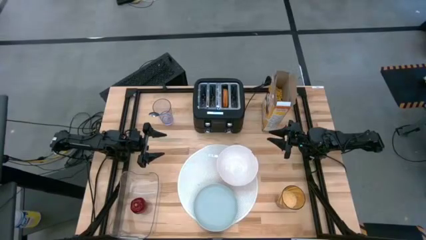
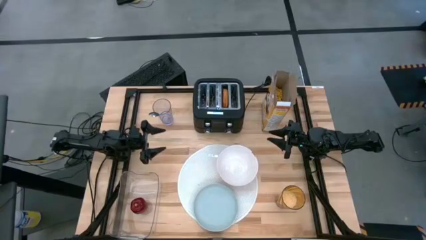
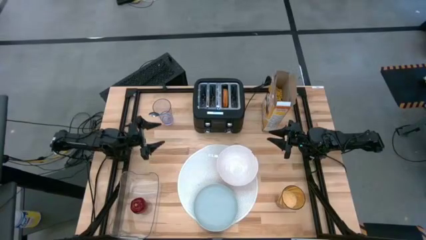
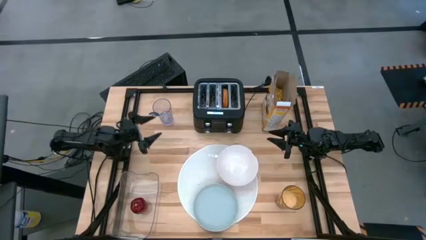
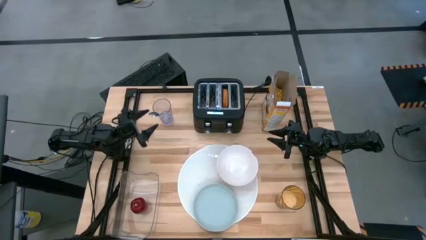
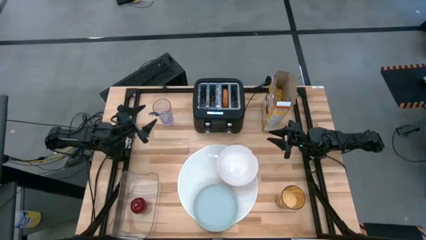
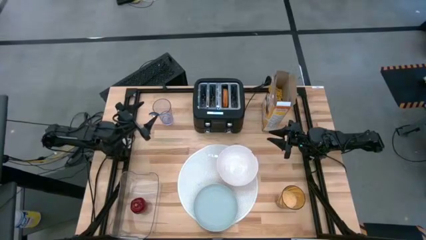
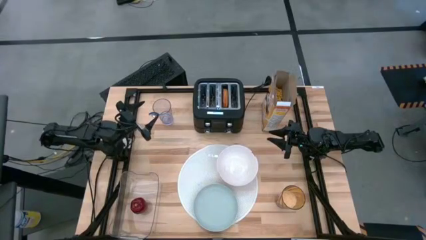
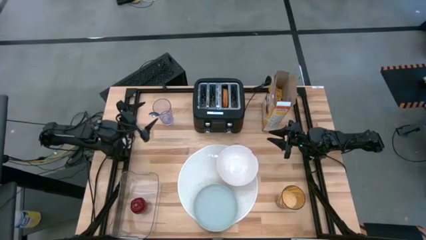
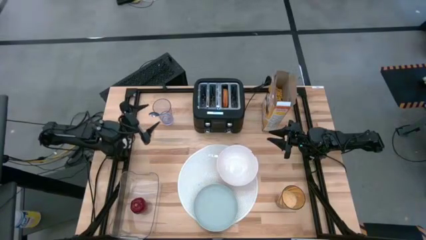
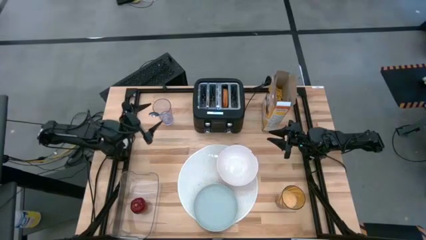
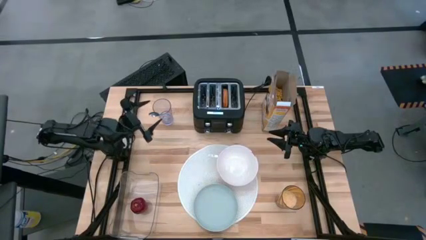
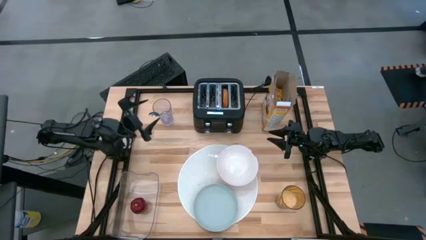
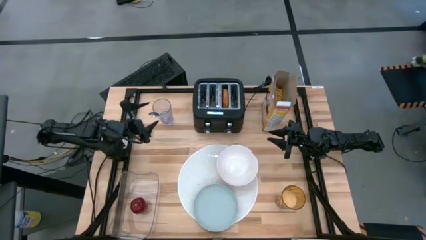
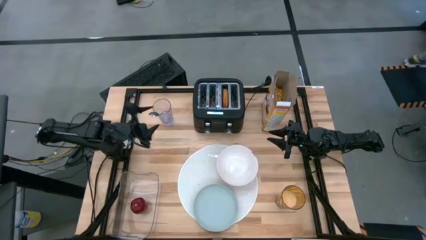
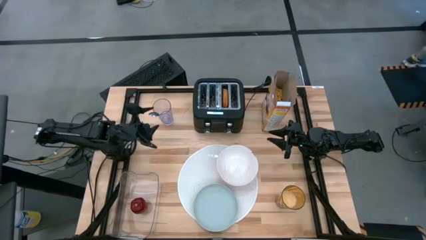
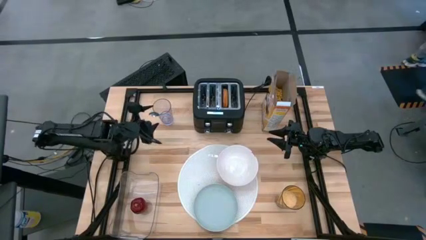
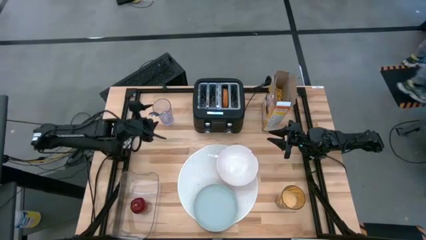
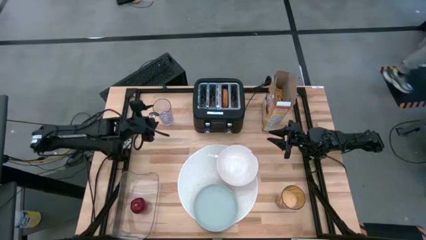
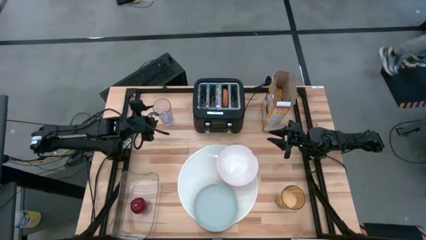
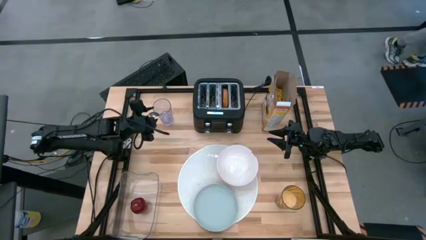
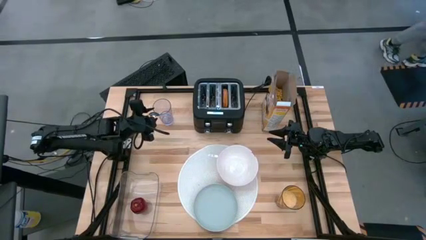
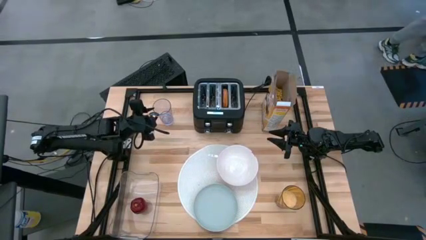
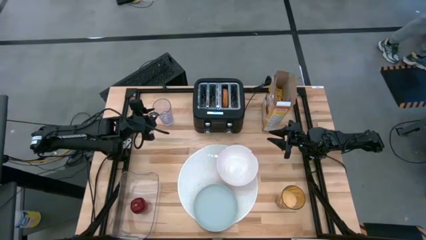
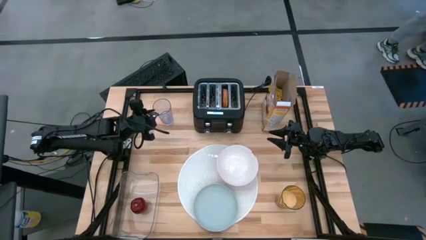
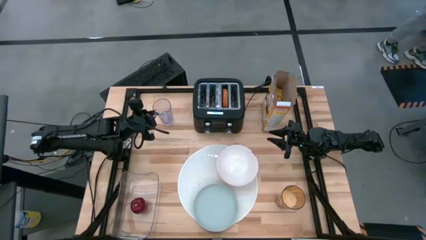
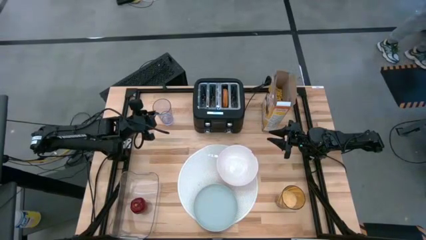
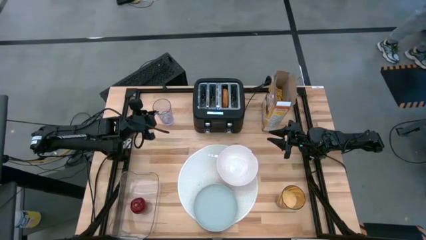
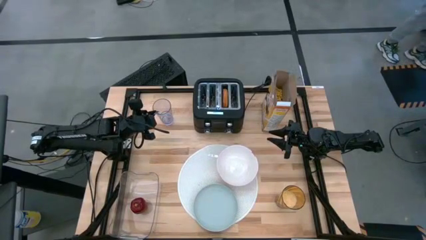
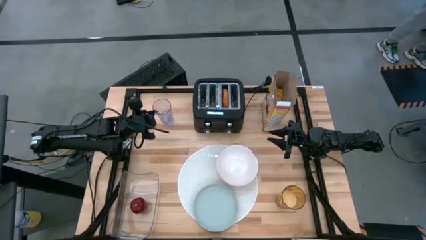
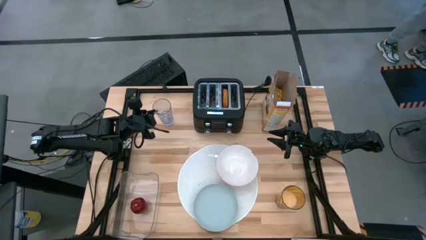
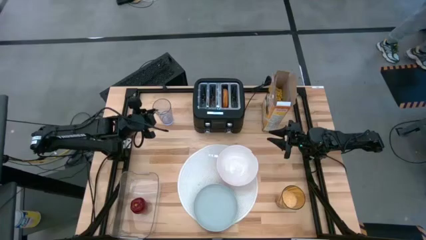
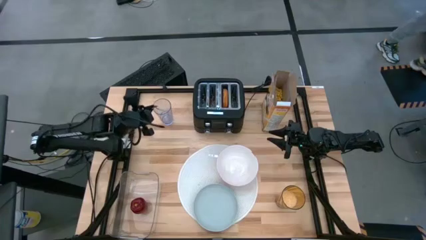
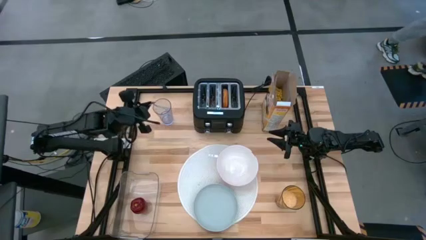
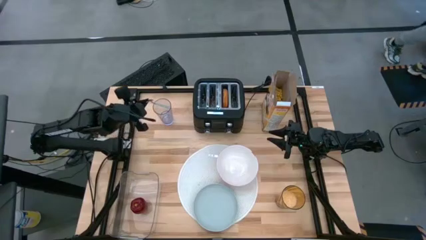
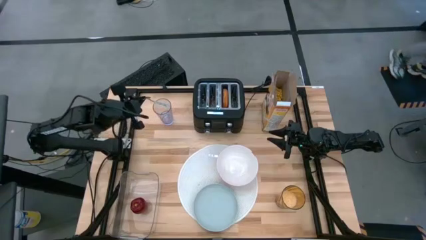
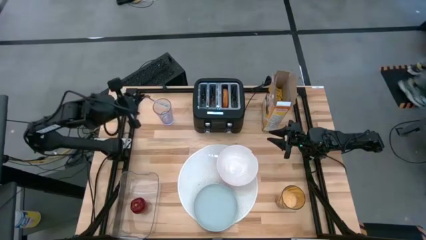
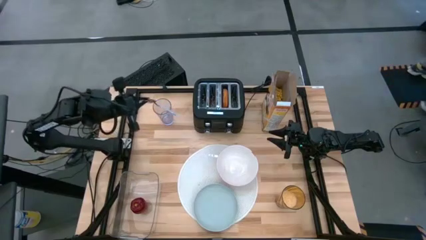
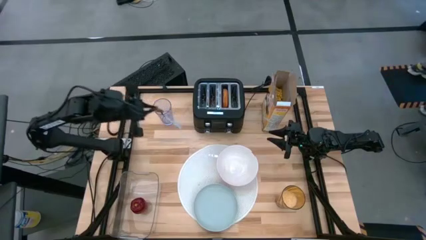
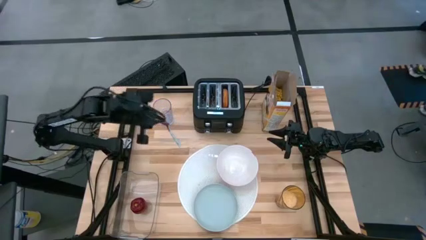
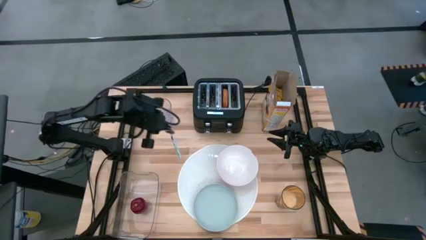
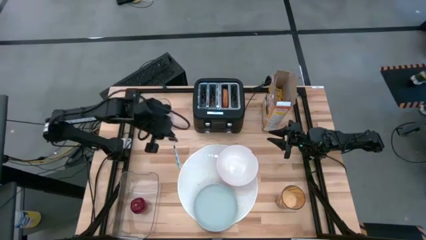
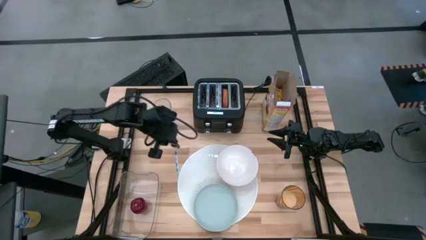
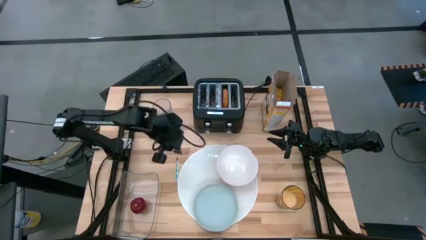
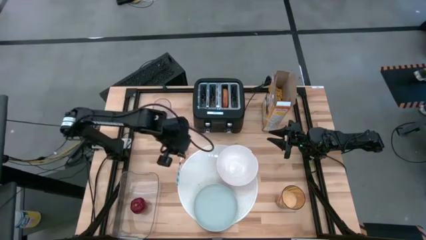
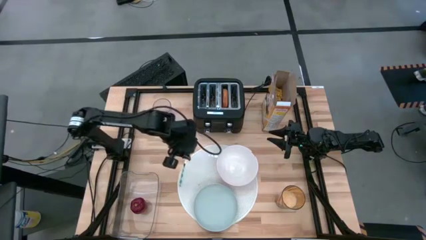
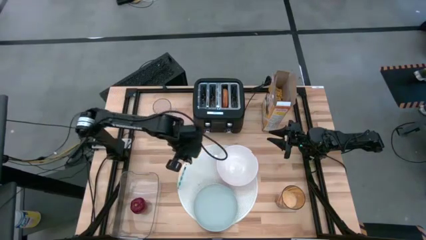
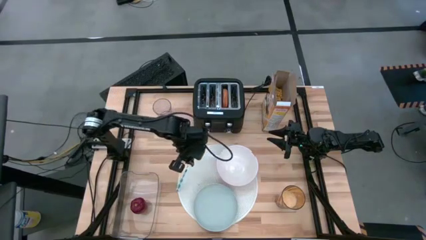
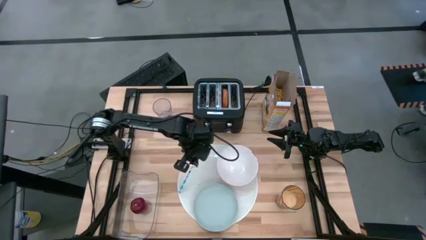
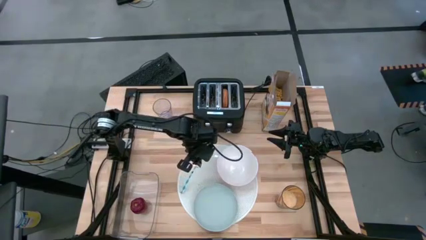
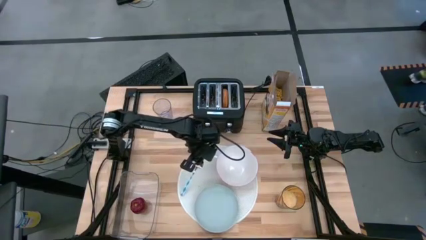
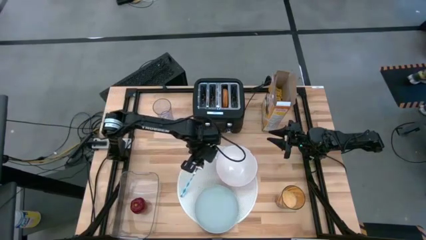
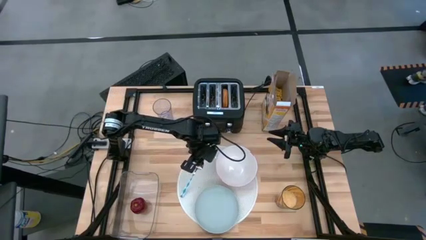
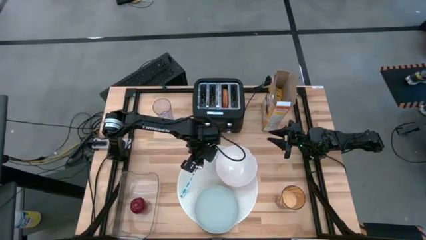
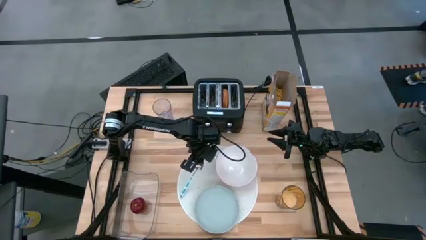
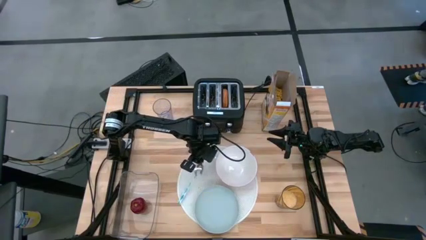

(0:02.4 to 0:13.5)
Task: Arrange a breakfast setting
Put the blue spoon on the white placemat
